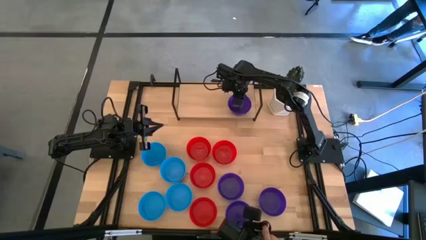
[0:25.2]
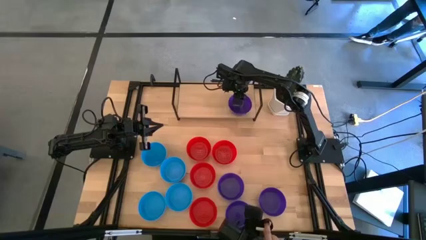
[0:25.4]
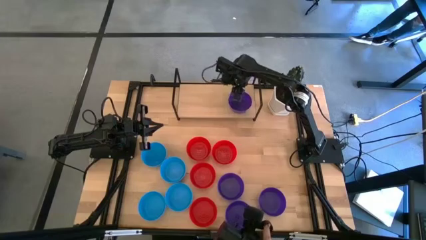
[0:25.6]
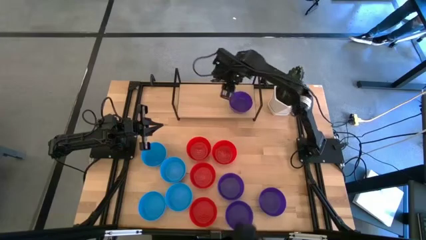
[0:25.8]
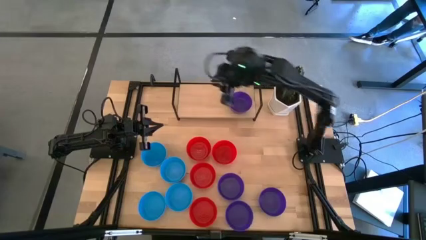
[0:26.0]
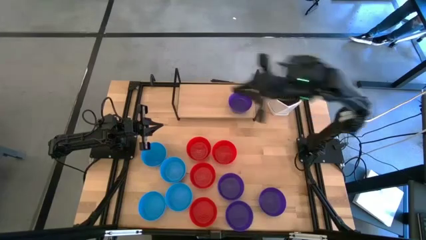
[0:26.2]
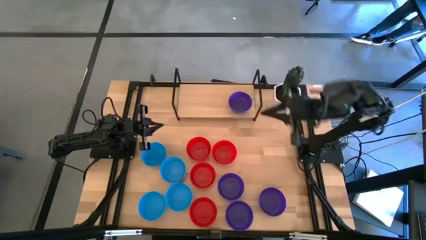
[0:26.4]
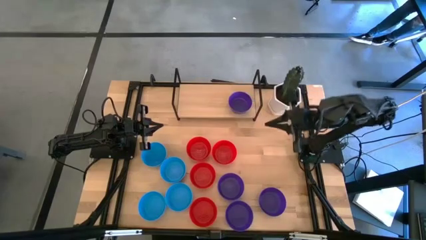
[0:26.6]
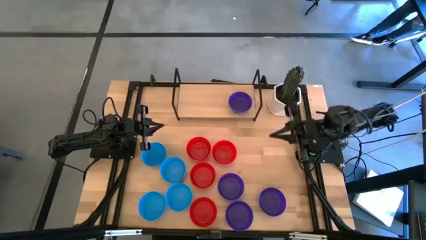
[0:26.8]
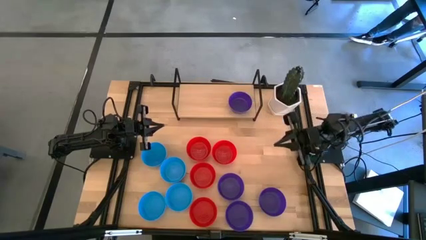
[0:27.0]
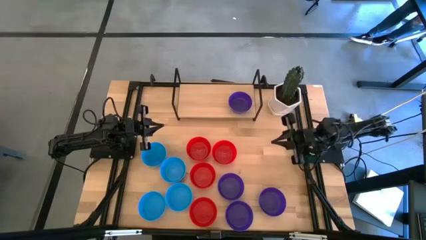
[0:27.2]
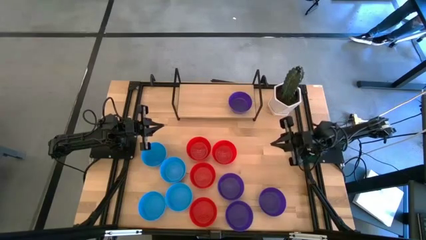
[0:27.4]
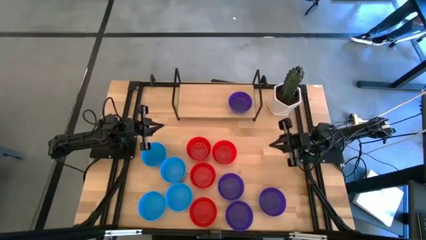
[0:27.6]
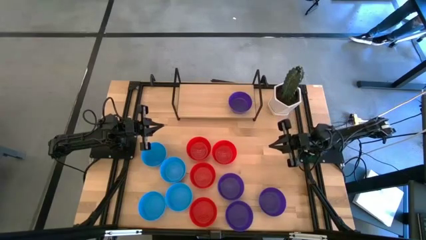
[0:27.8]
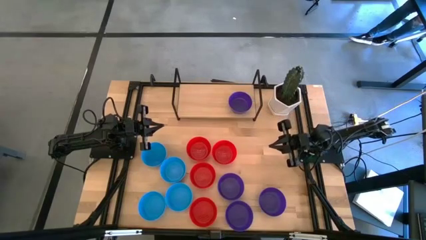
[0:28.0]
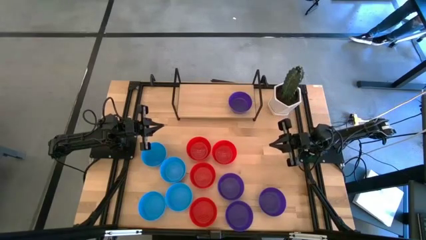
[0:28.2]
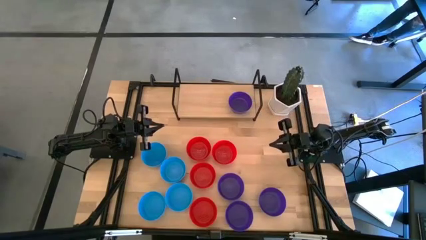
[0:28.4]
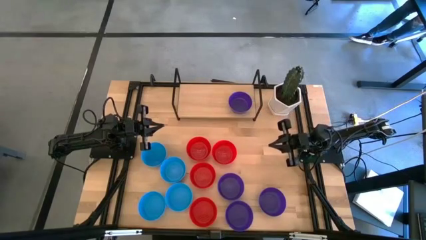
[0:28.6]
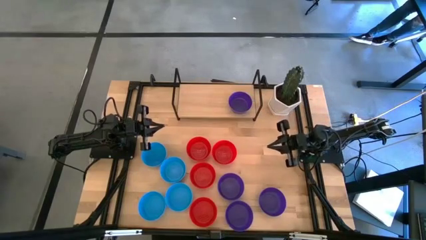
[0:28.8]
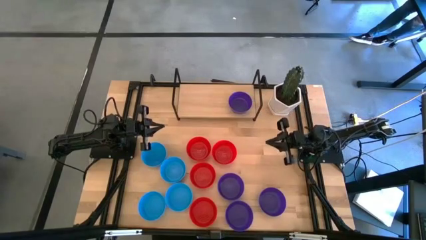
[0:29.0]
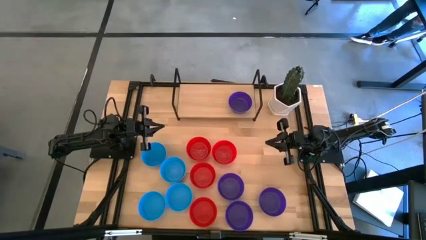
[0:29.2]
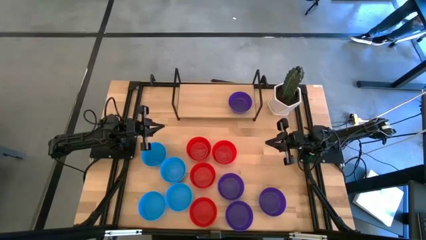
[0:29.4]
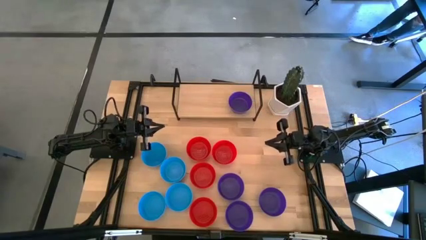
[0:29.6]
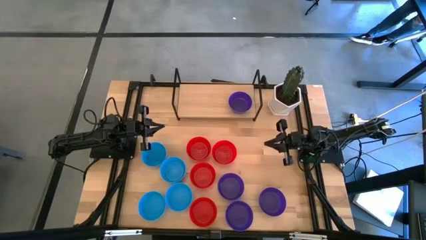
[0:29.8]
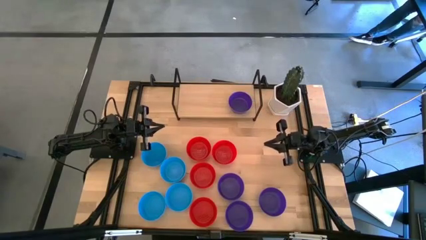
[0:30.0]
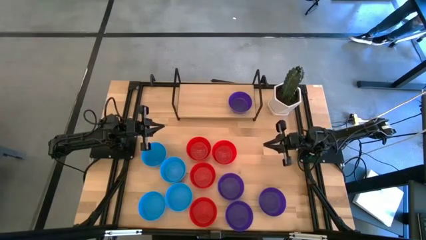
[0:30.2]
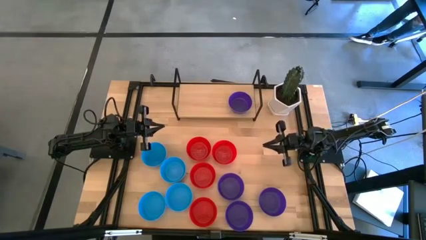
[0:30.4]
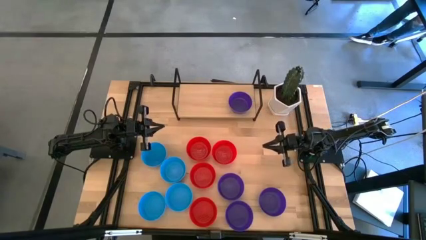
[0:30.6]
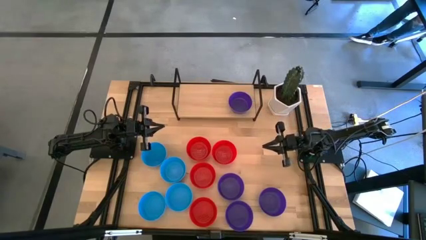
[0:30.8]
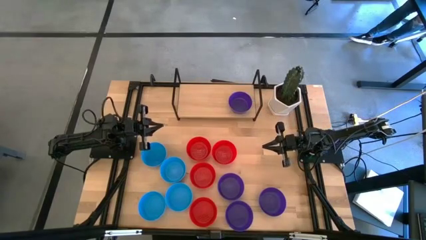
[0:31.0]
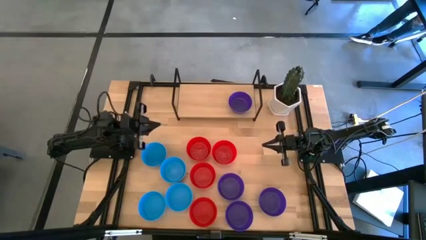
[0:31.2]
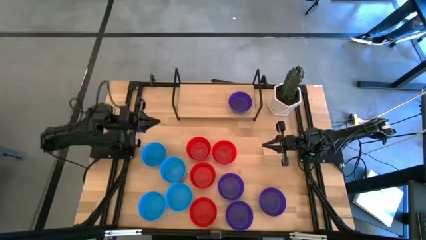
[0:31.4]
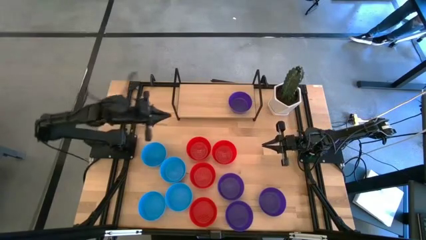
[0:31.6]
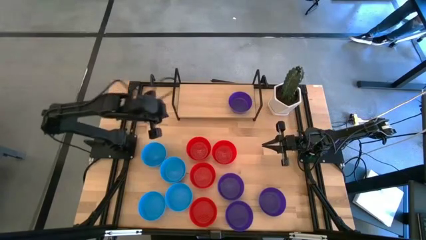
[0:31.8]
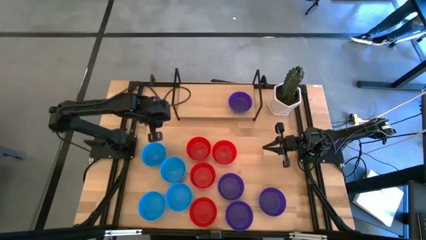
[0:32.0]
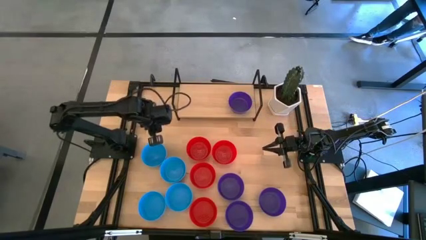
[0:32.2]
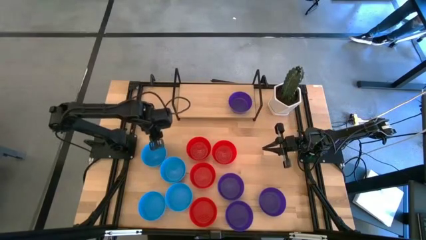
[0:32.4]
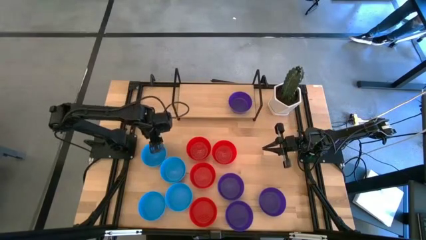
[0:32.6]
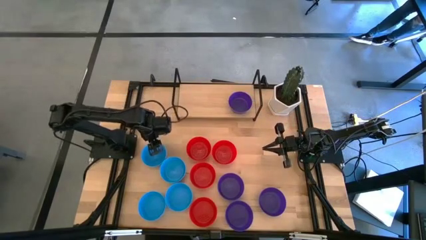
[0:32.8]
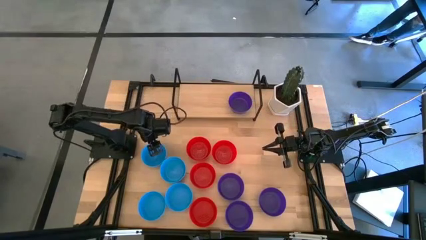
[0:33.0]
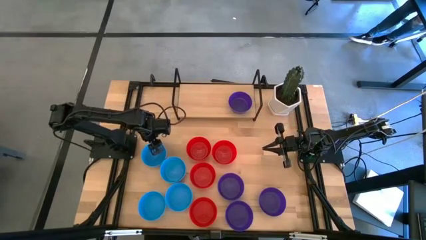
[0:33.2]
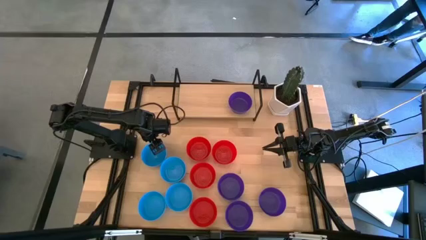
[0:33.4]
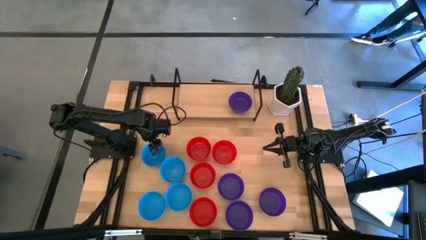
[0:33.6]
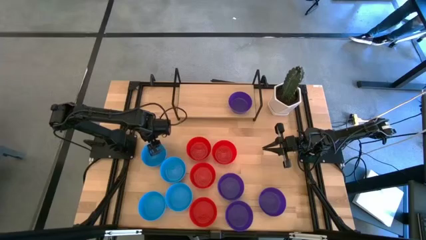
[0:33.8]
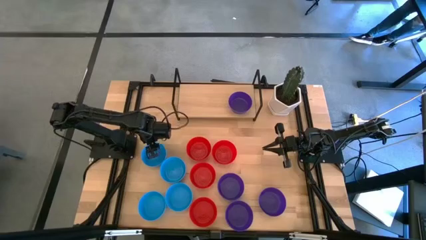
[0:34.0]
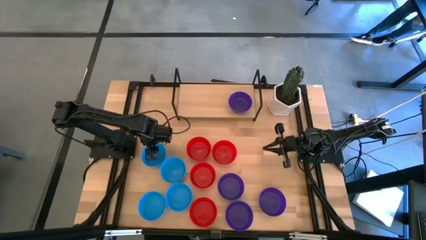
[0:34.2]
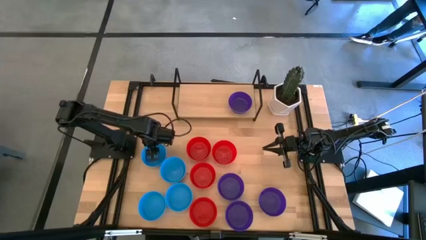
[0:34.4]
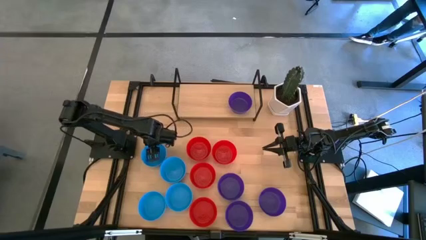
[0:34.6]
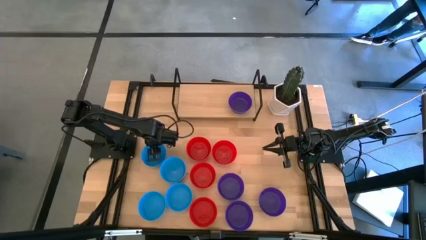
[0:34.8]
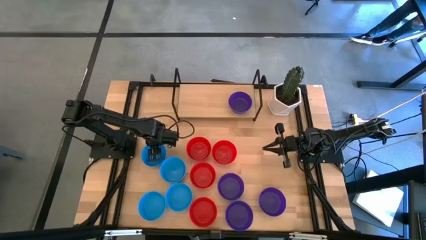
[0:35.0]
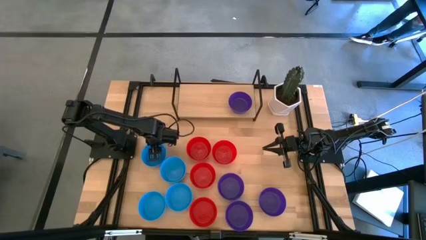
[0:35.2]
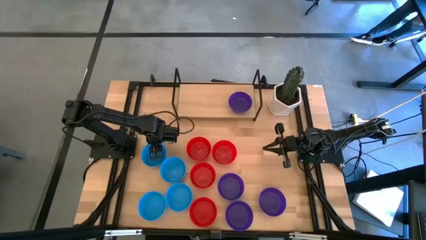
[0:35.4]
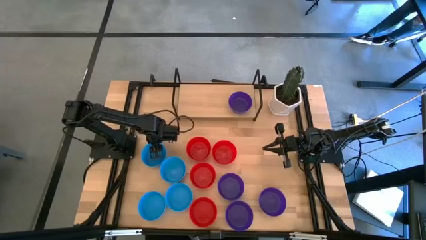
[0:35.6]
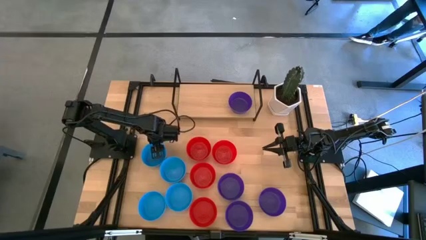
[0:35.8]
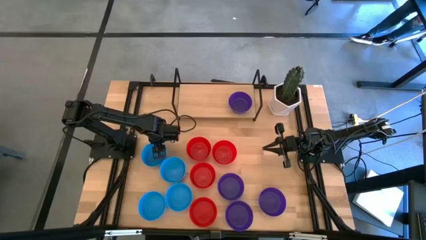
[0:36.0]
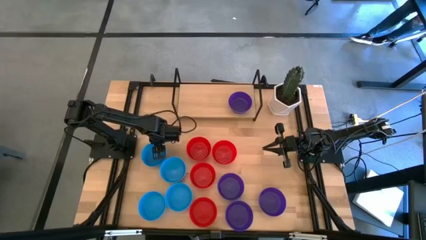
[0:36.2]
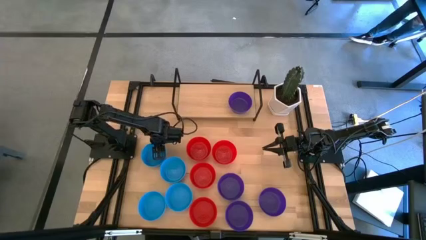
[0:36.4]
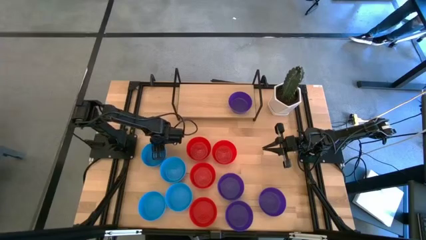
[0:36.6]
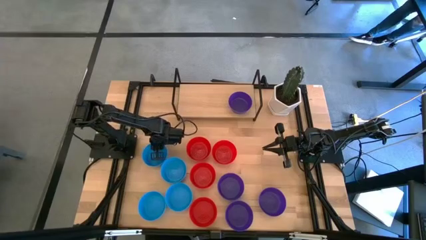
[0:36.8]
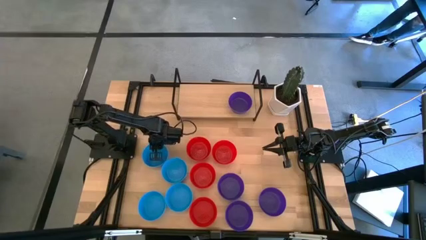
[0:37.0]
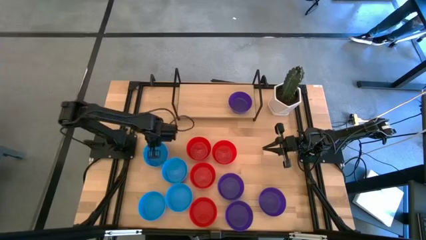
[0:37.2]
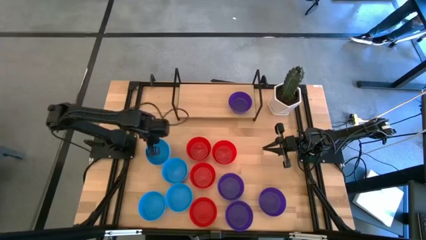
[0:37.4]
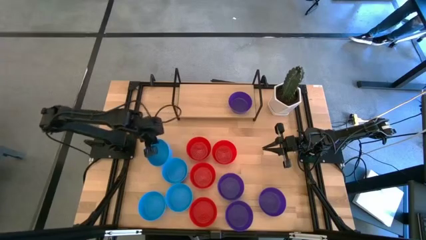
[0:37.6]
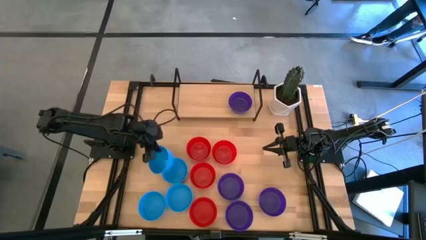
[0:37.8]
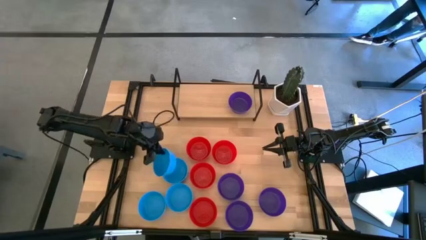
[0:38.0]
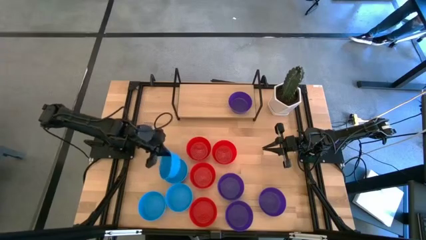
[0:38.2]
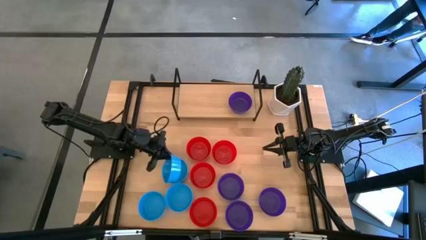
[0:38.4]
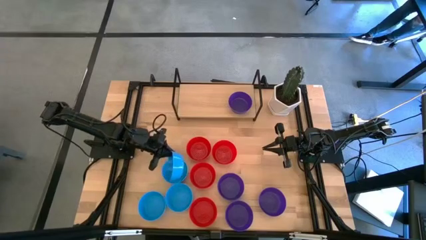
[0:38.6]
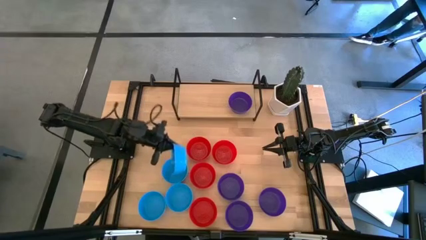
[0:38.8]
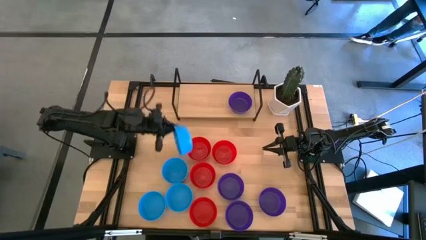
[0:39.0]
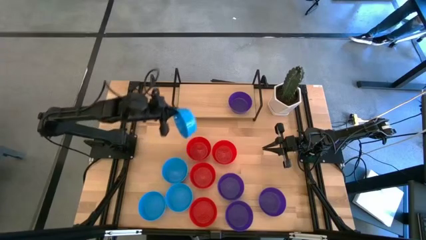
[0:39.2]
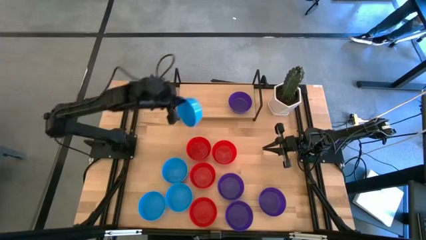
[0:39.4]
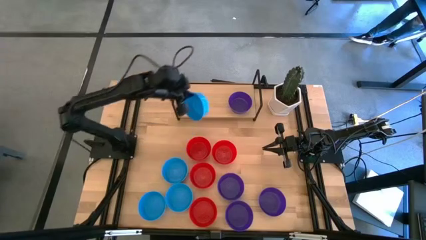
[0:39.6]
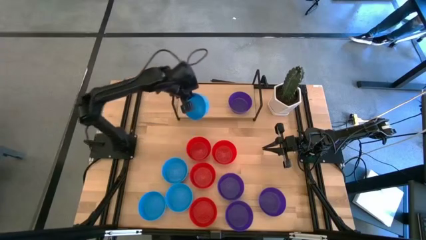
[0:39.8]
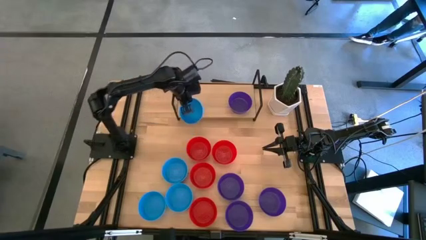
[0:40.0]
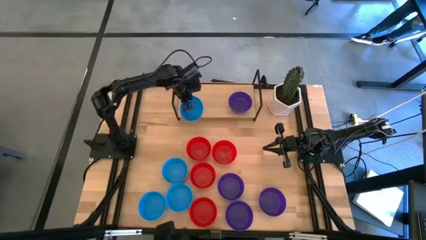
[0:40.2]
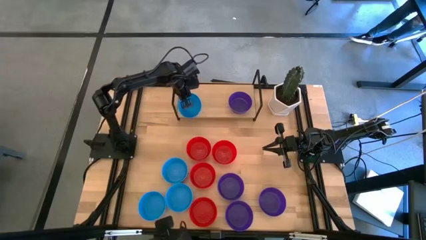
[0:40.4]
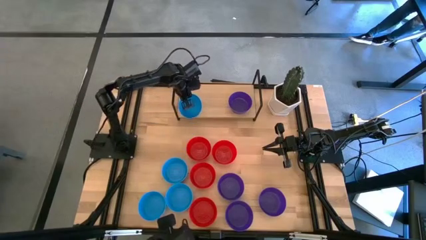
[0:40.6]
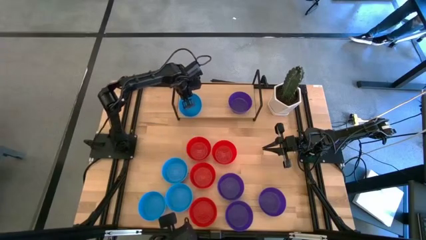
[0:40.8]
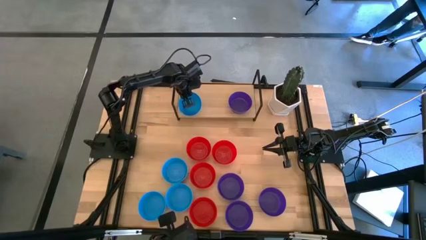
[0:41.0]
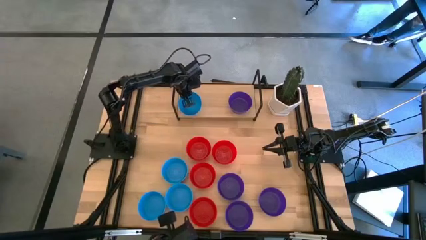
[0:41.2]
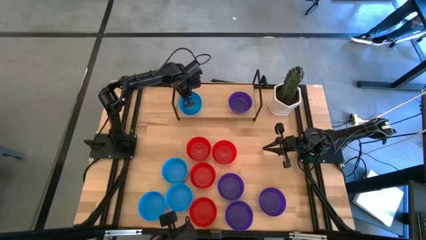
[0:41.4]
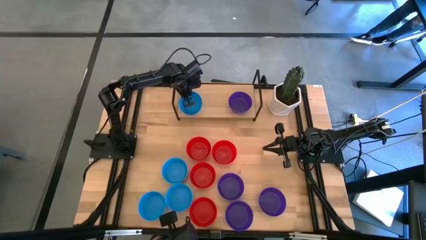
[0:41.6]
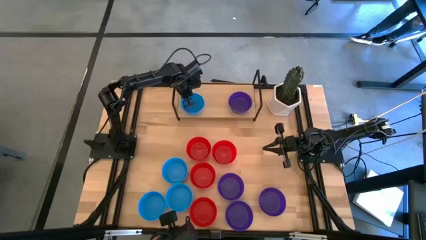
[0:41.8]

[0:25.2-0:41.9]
Task: Pick & Place Mini bowls
Put the blue bowl on the shelf
